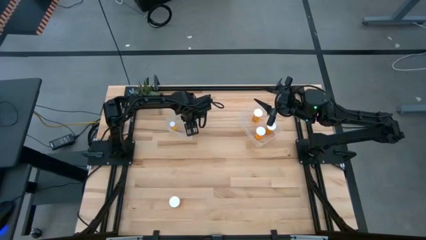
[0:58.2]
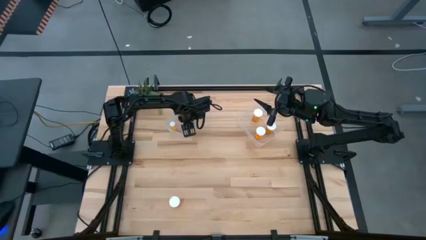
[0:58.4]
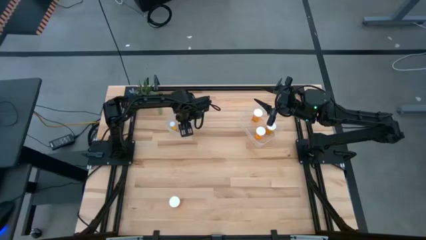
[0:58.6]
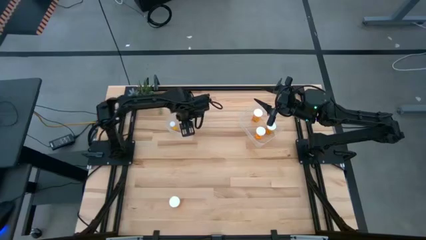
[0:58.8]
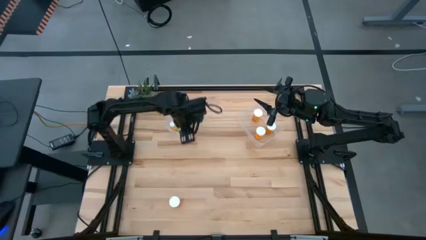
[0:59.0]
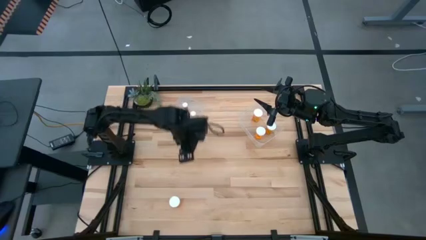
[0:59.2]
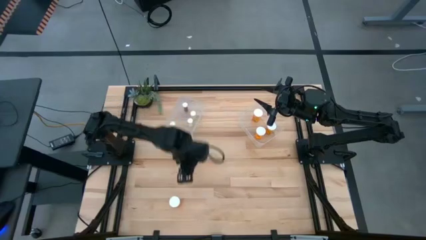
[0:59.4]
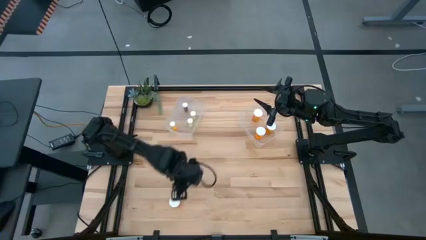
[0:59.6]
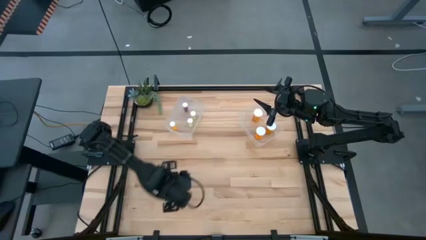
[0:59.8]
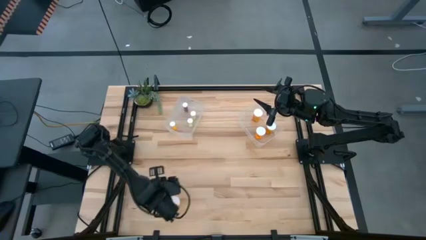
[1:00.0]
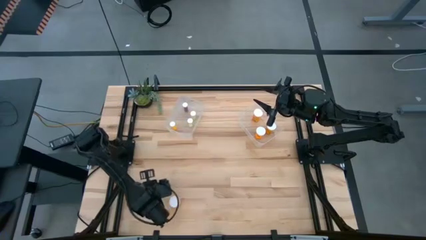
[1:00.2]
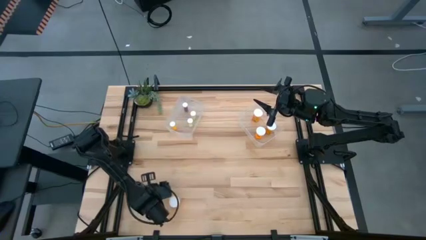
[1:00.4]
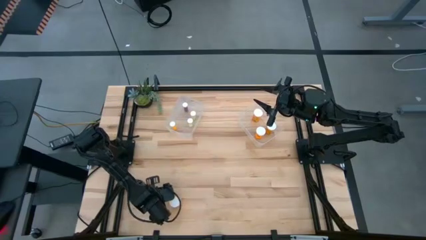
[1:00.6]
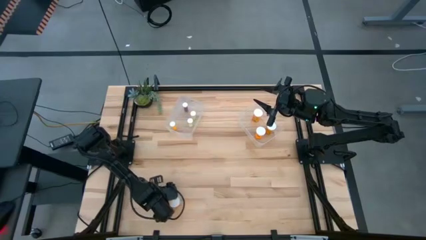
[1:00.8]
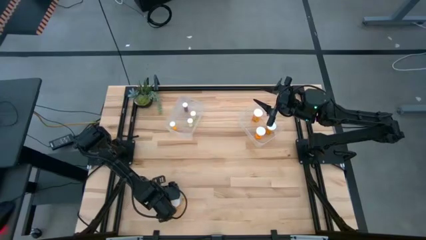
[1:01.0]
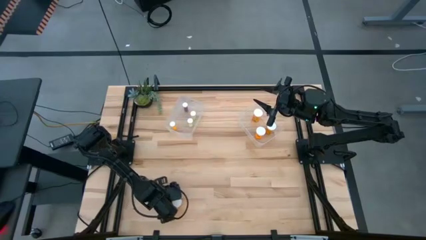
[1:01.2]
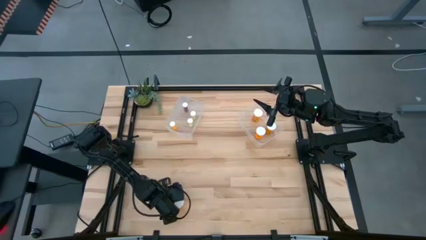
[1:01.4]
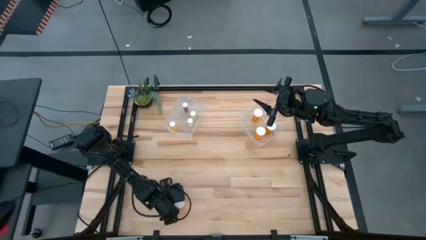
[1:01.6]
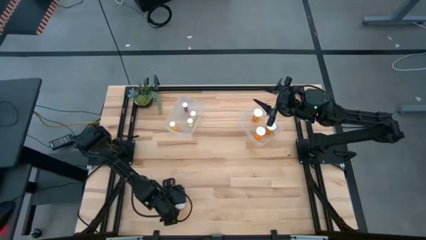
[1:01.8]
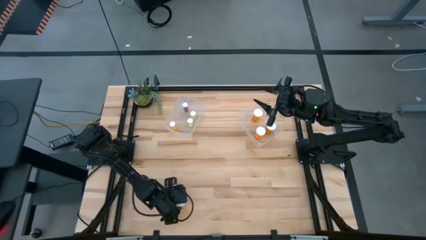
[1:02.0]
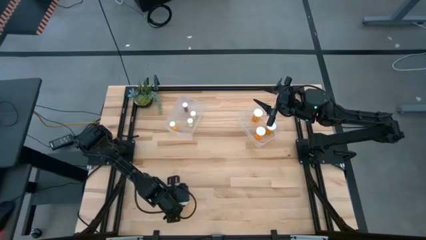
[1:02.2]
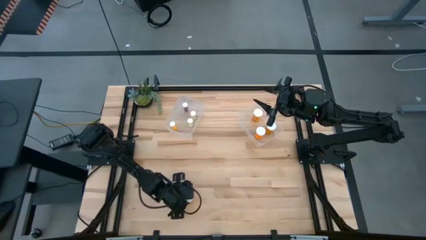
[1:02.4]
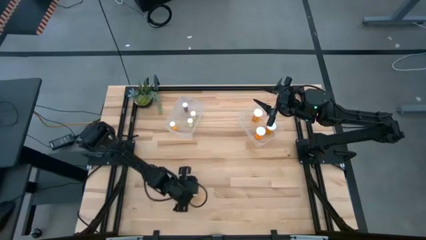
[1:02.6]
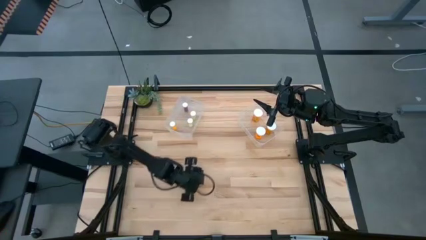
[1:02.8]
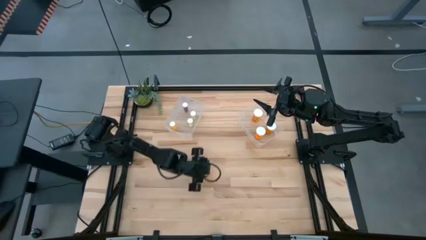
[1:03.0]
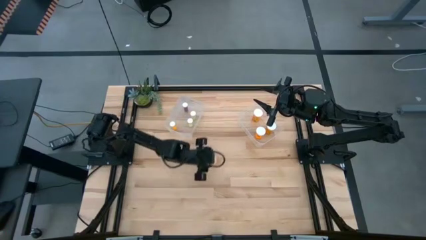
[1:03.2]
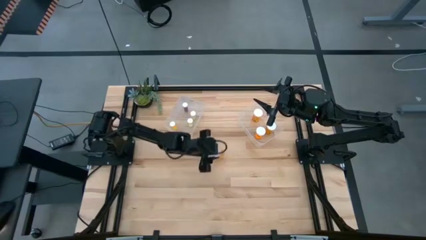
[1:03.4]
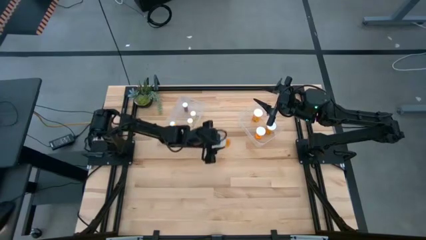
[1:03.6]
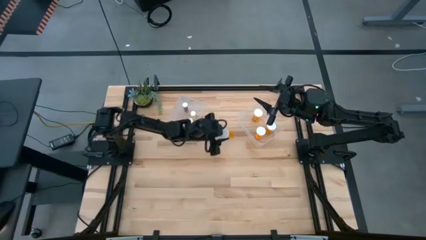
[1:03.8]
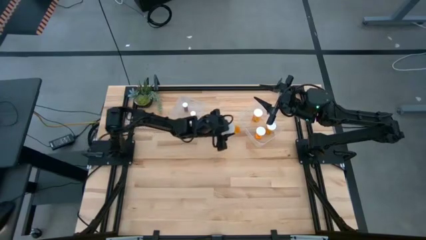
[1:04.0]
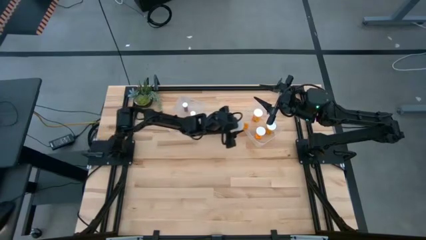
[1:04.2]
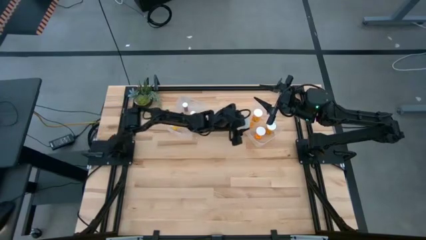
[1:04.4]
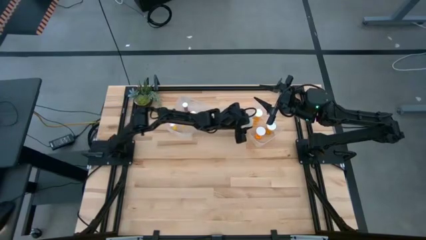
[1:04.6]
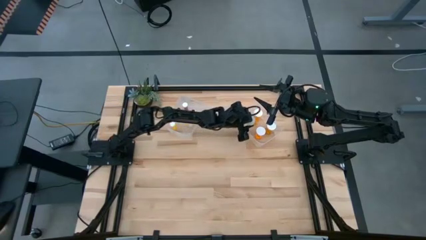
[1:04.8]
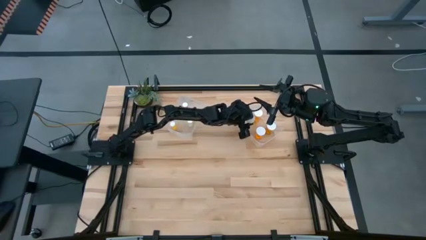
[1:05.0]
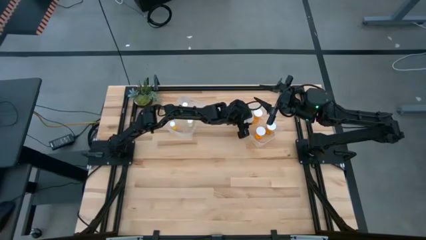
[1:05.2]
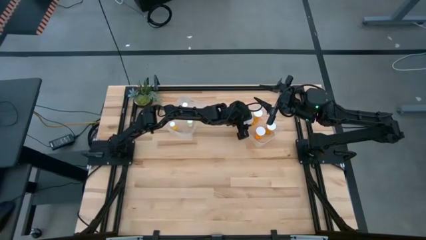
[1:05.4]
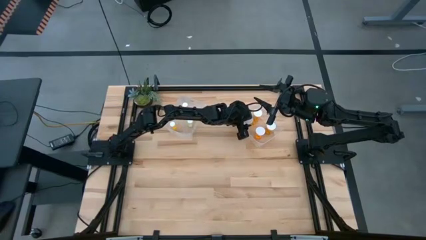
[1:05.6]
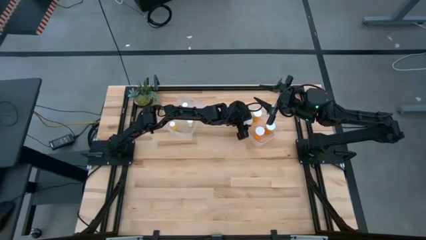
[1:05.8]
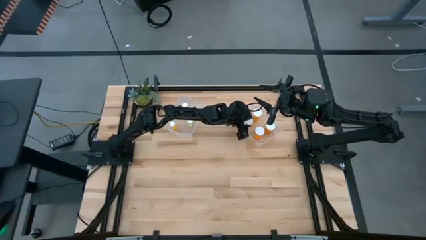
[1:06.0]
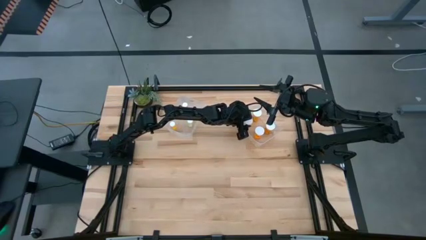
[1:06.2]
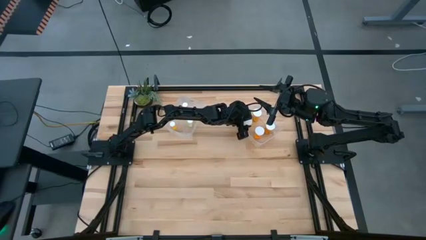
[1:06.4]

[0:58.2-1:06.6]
Task: Pick and place medicine bottles into bin by pill shape (circle, oval)
Put the big orange pill bottle into the right transparent bin

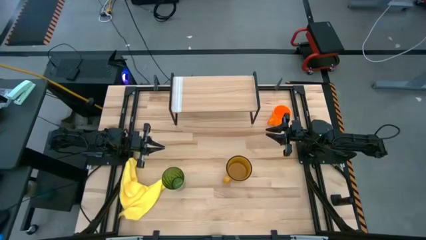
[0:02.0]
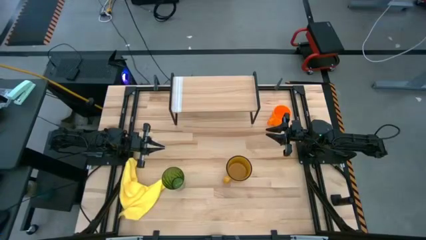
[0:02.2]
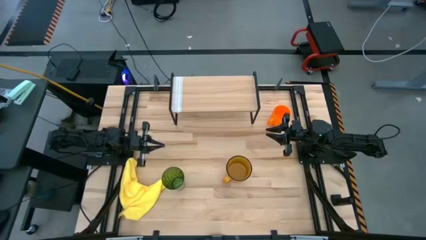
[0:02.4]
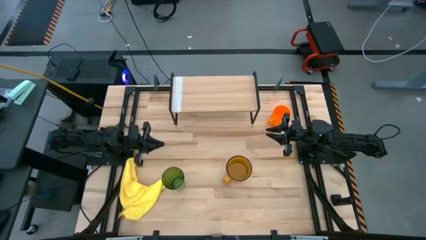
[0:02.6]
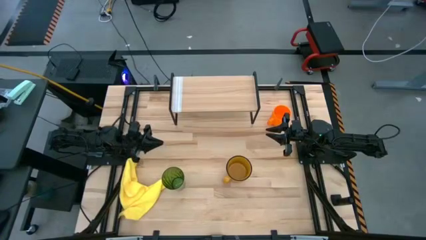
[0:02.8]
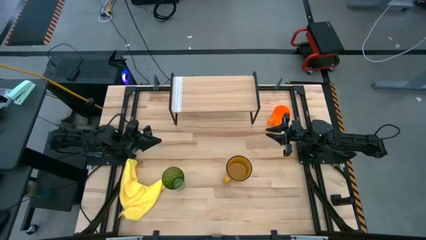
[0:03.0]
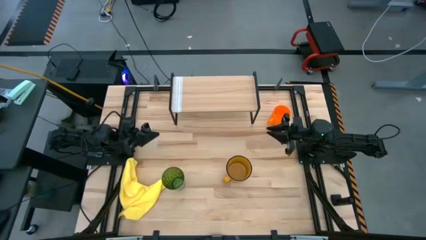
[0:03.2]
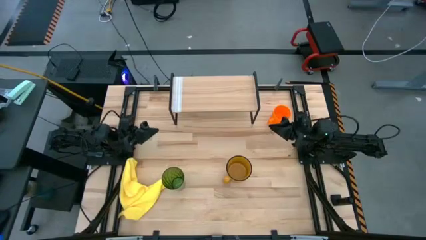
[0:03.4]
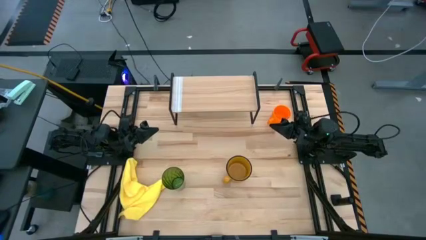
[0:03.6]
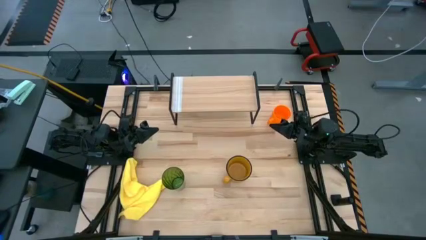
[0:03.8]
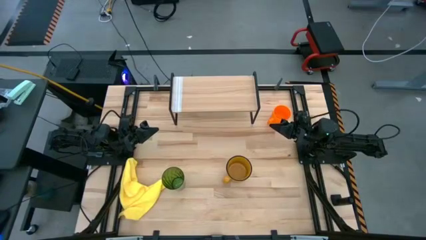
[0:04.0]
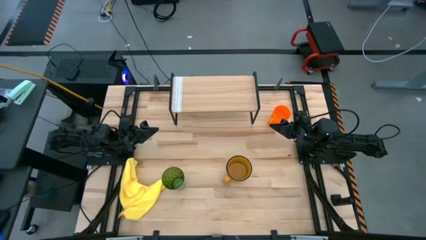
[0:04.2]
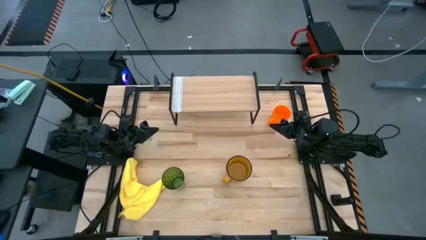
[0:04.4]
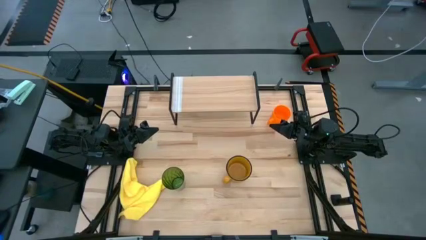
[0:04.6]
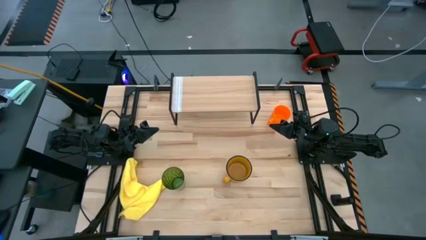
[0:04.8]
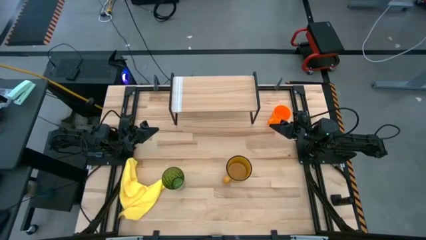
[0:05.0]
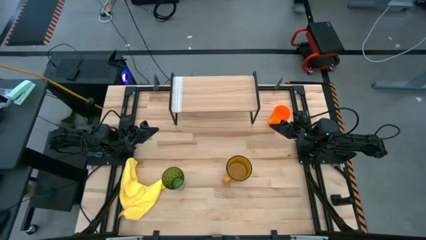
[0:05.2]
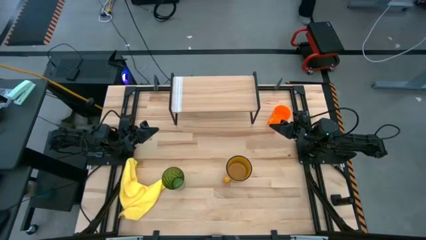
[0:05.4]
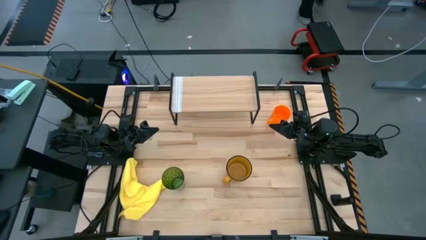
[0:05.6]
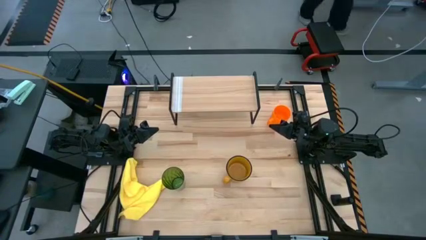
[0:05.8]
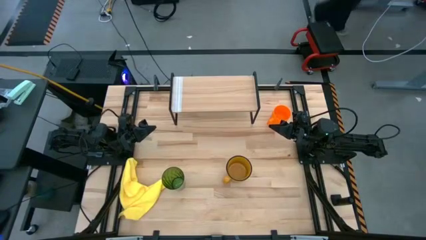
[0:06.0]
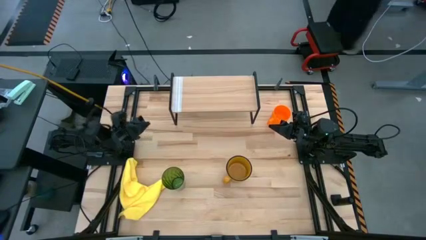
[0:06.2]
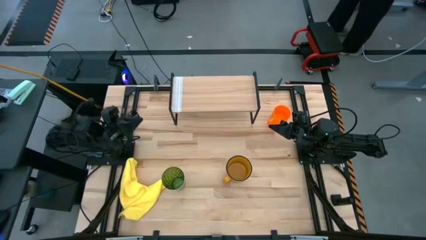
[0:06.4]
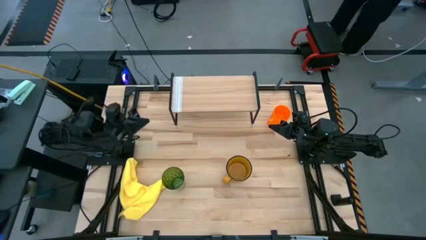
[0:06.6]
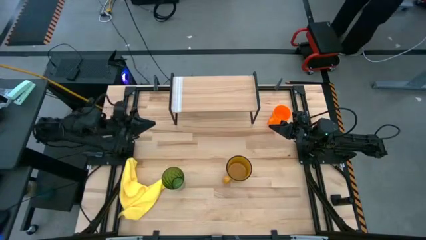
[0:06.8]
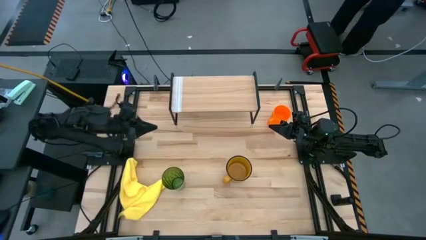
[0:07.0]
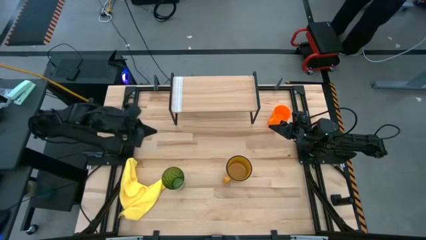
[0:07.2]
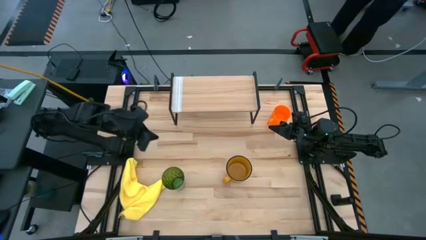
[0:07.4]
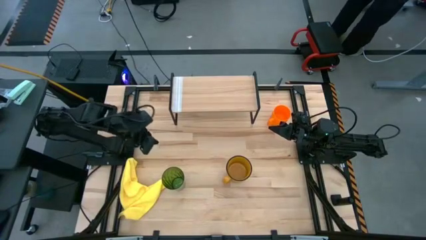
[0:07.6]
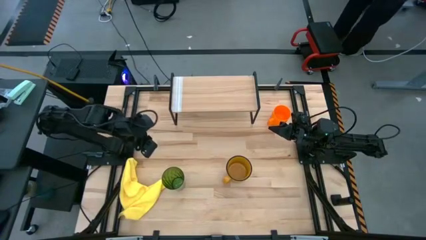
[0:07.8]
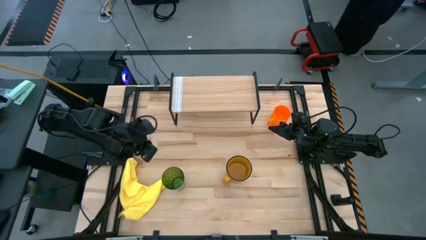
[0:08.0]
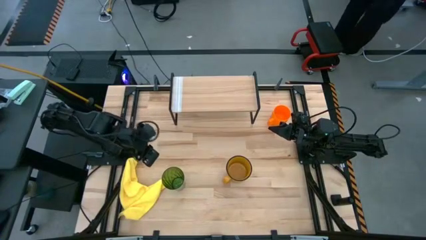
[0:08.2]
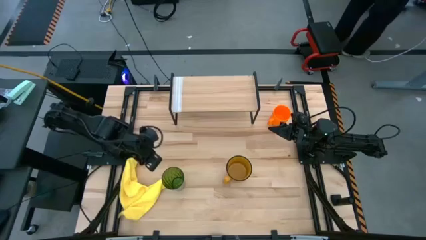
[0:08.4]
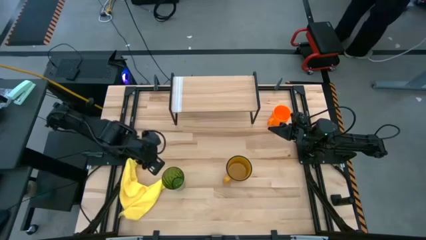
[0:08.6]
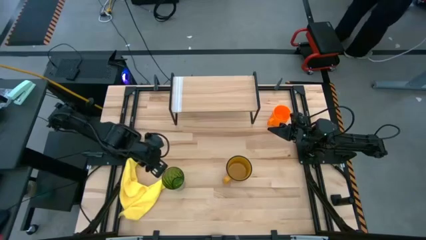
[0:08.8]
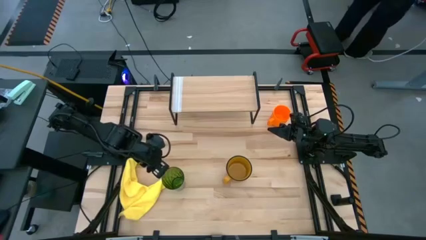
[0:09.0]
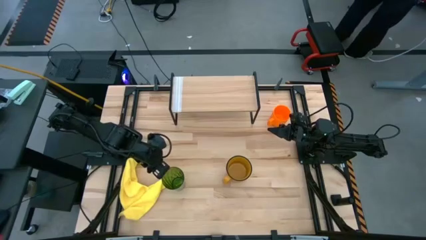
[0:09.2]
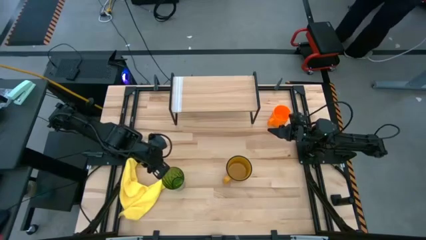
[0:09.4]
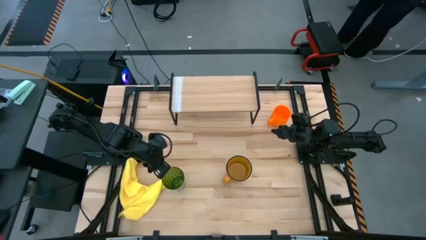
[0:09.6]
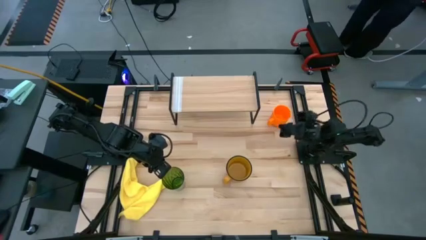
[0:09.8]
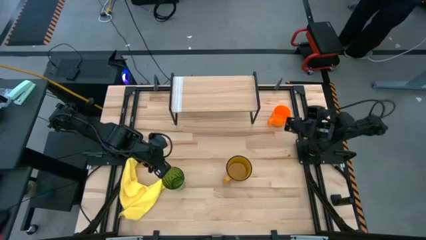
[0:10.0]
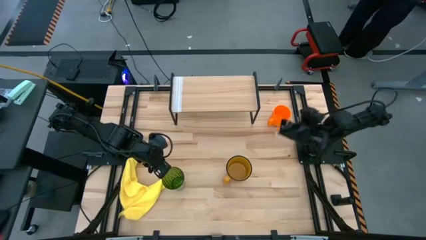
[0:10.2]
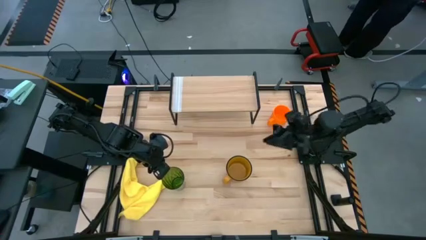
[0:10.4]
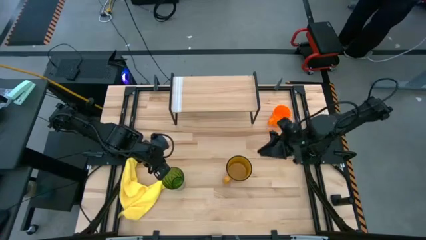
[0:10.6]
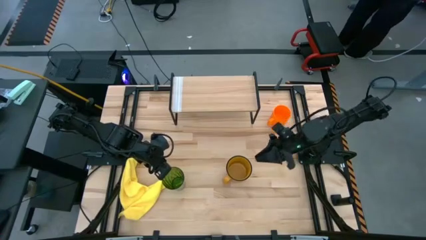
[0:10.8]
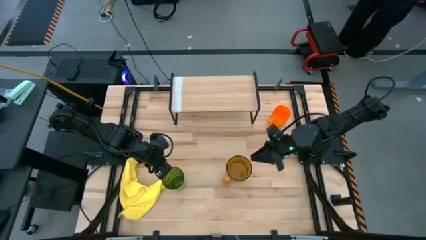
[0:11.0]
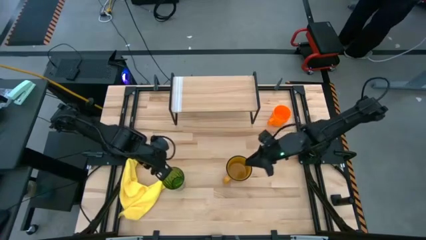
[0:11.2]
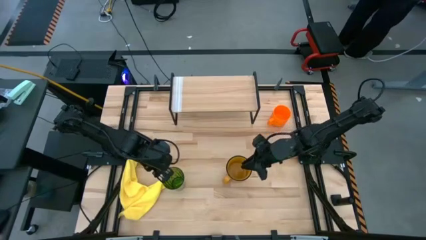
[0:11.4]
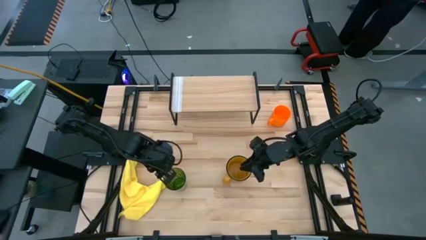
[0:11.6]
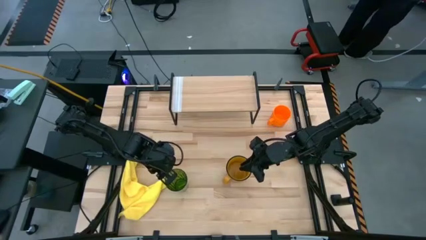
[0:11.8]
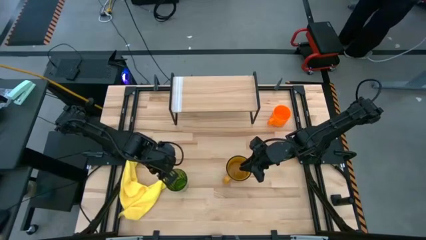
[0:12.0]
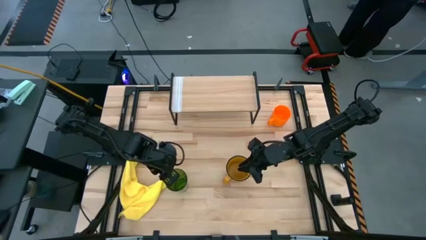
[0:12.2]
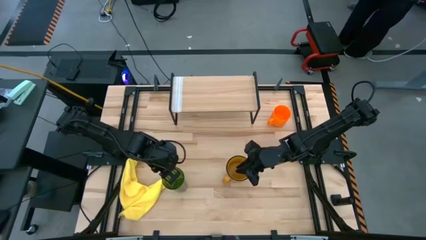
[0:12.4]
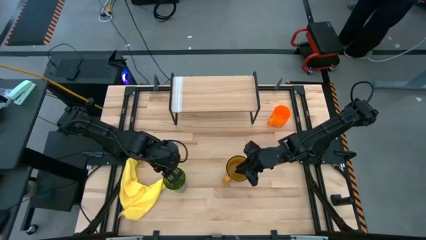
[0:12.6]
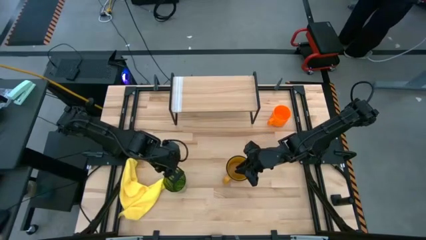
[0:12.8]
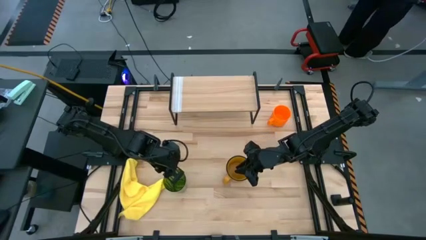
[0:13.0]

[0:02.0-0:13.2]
Task: Stack small to large cups/mugs on shelf
Put the green cup on the shelf
